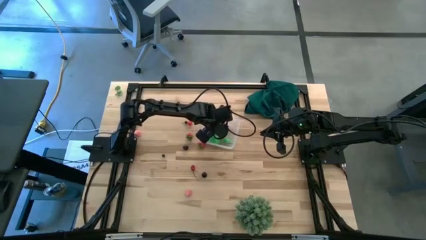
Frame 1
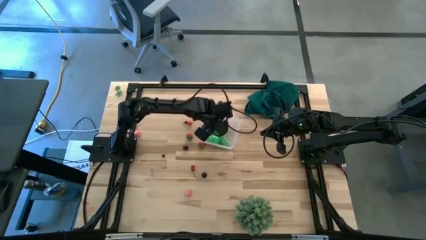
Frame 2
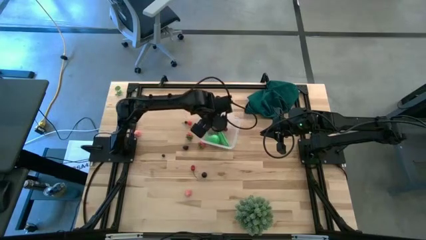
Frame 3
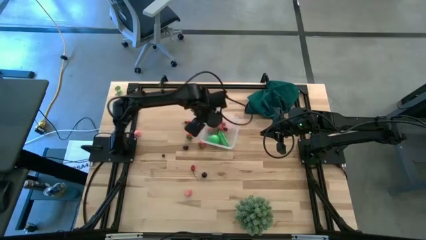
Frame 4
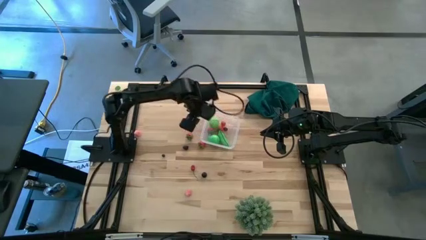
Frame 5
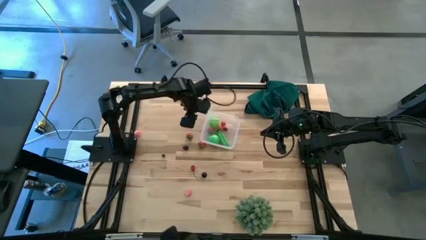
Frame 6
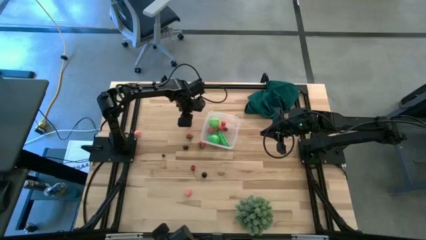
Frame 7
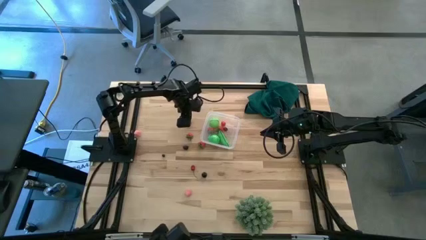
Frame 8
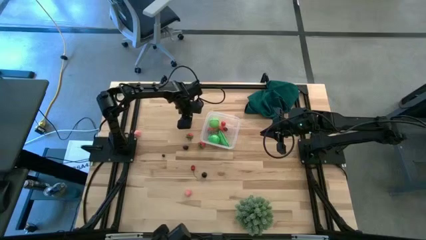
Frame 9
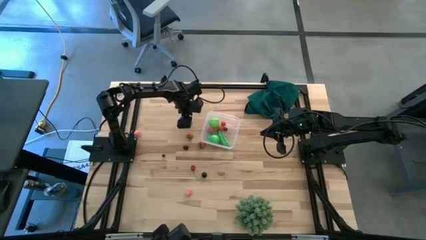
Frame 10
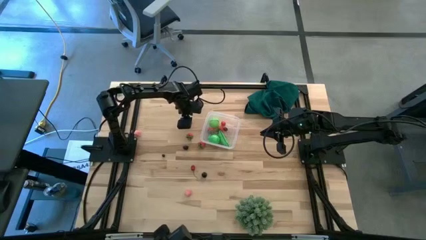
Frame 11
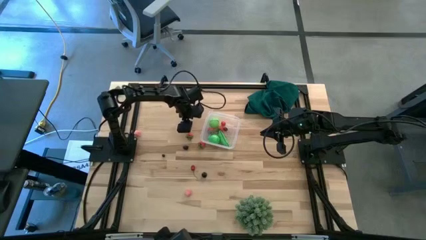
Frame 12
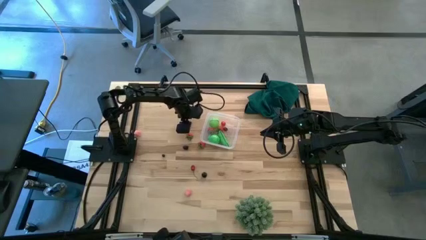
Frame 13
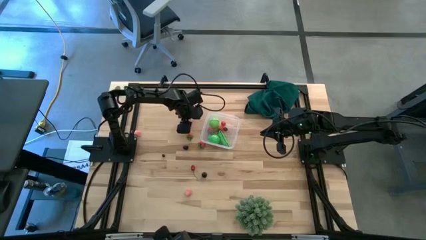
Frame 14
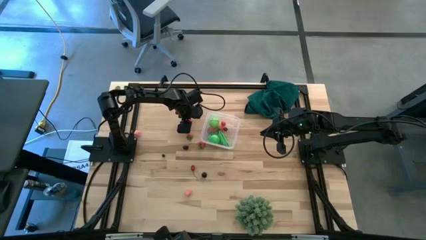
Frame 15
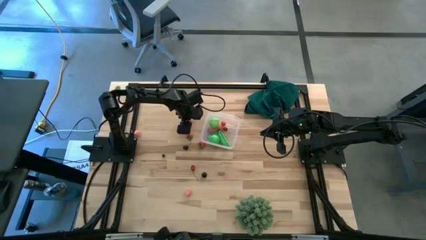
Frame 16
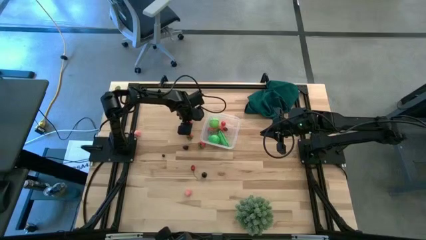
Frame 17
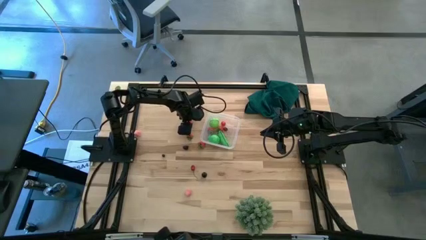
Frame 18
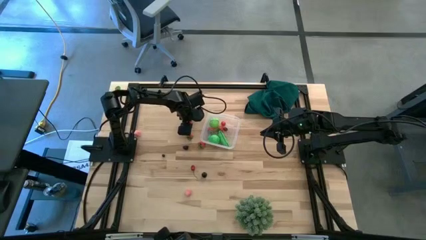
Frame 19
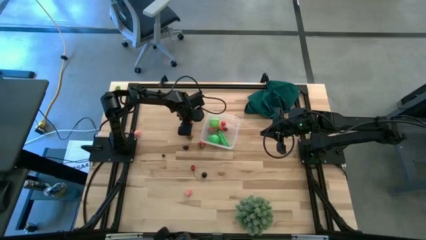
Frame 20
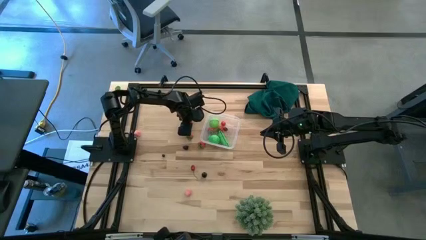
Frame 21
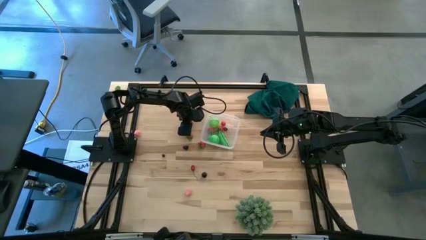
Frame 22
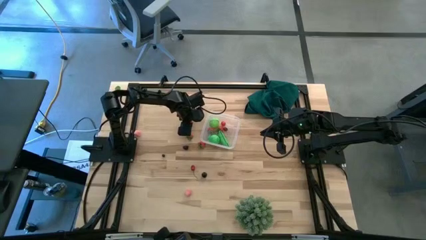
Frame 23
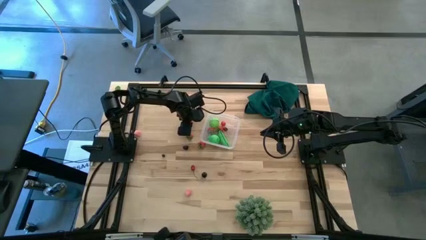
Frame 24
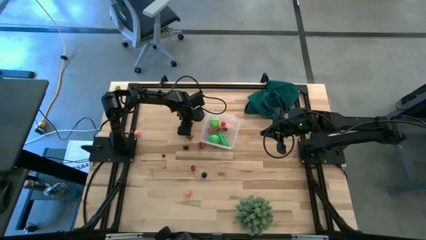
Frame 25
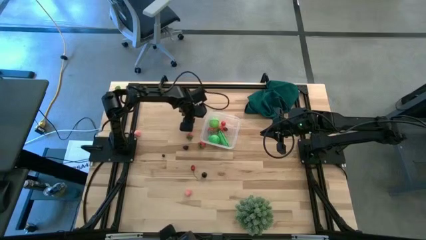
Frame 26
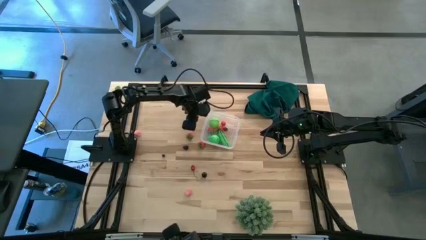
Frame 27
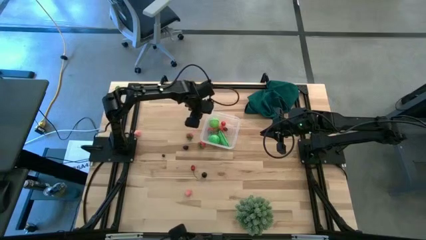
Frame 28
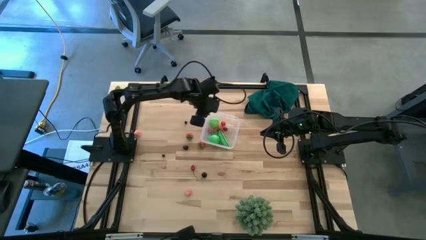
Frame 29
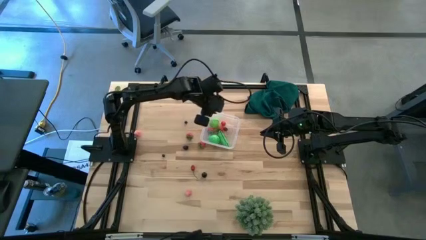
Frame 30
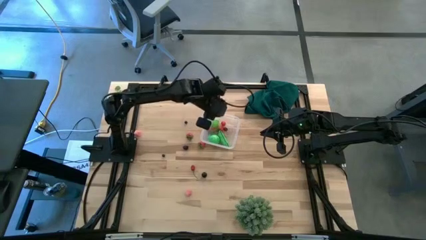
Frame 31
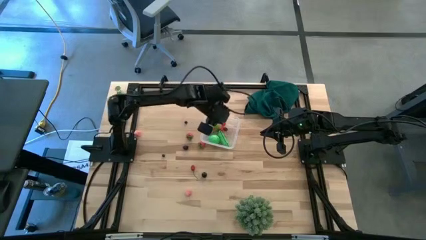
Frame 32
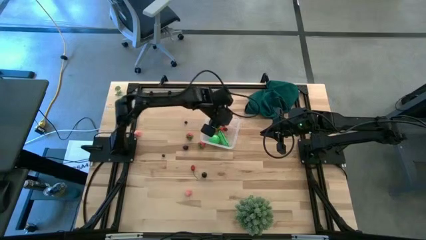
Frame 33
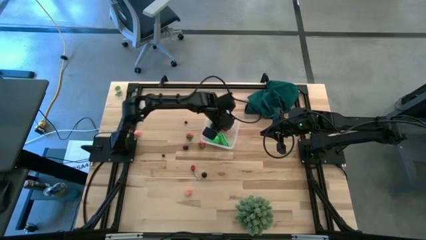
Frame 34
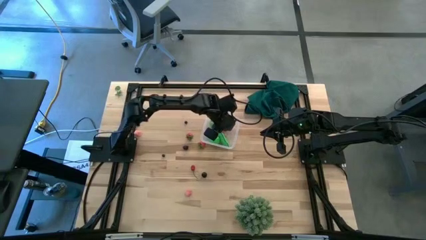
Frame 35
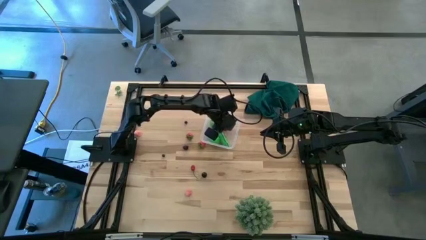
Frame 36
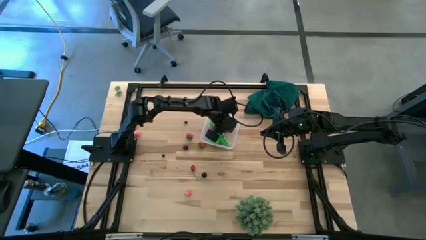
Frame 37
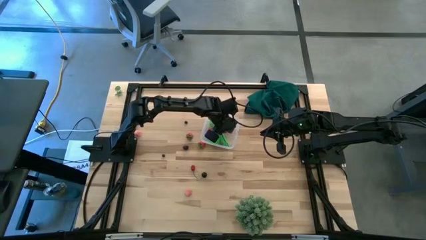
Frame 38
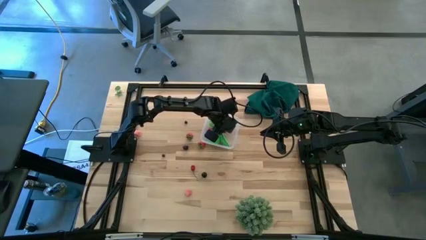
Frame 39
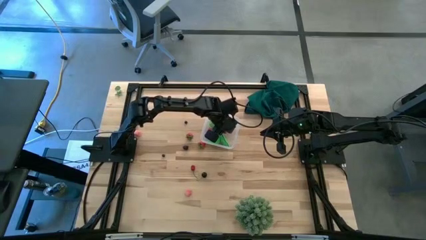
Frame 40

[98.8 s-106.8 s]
Task: Pick and placing Produce into tupperware
Put the red cherry into the transparent bin

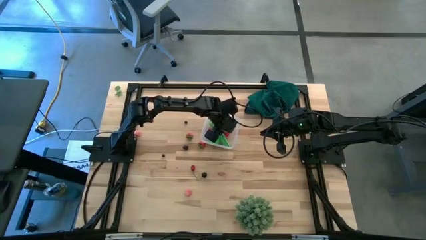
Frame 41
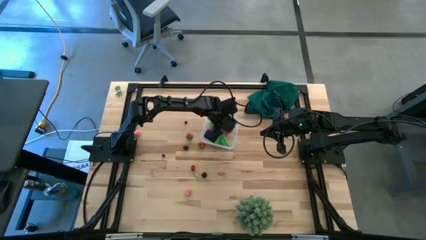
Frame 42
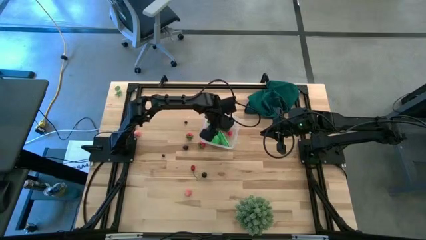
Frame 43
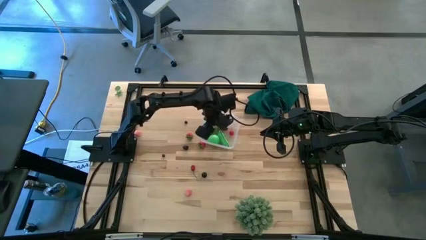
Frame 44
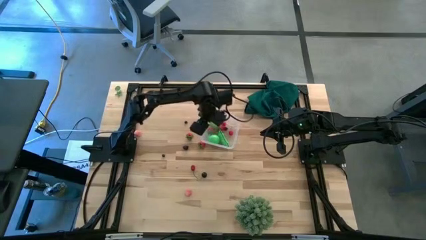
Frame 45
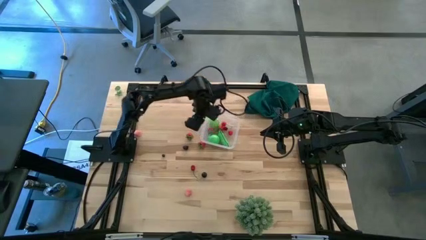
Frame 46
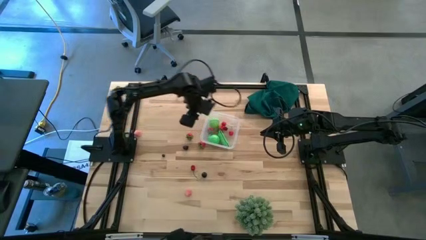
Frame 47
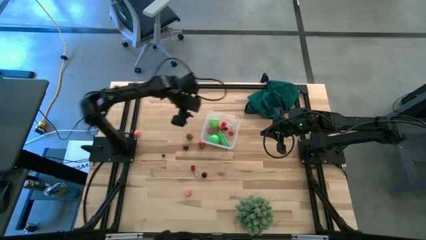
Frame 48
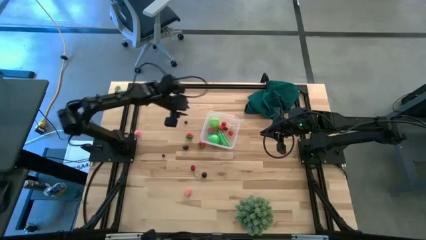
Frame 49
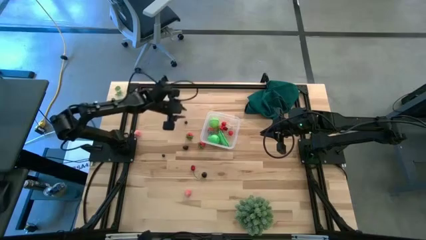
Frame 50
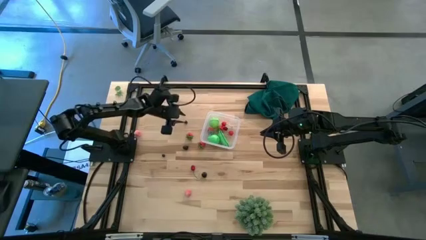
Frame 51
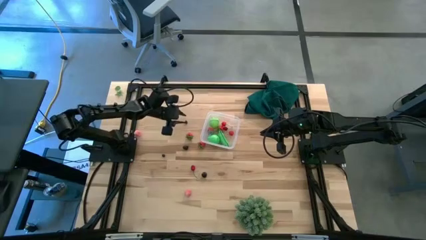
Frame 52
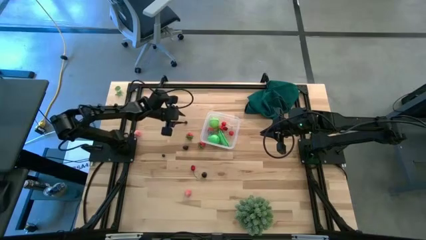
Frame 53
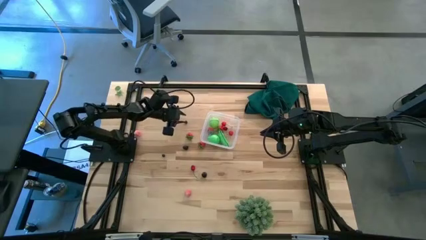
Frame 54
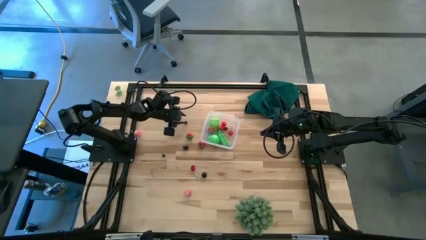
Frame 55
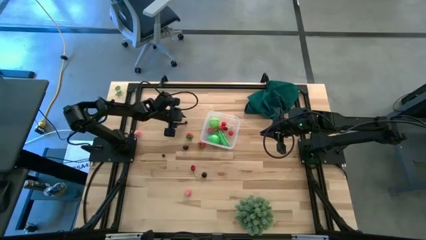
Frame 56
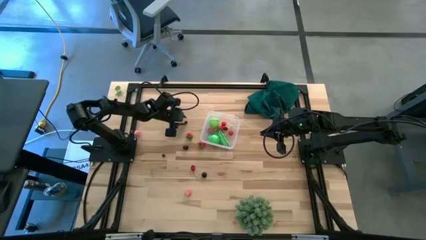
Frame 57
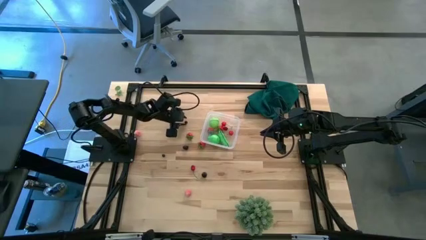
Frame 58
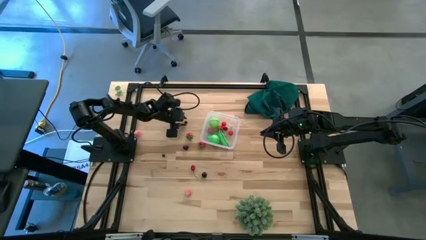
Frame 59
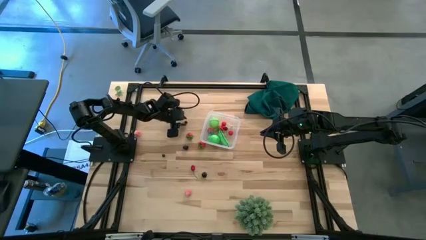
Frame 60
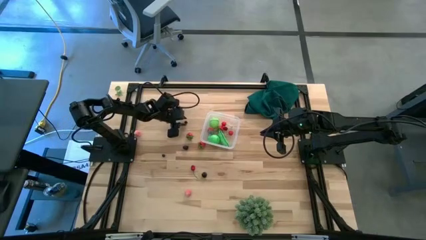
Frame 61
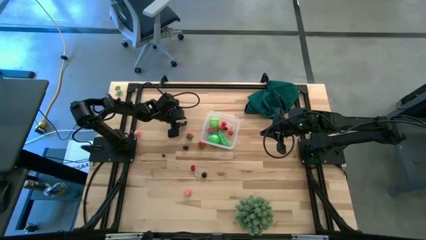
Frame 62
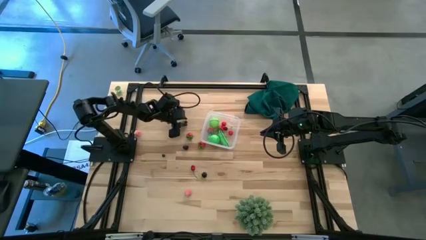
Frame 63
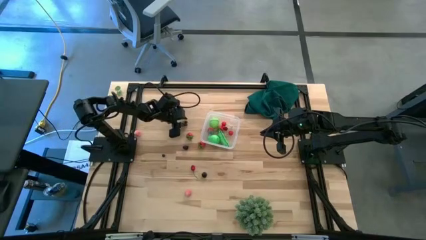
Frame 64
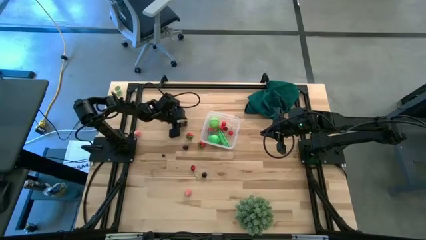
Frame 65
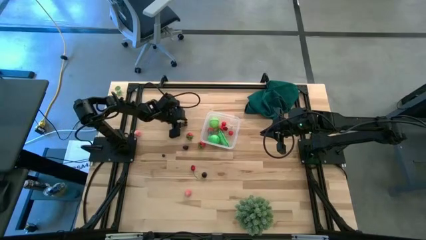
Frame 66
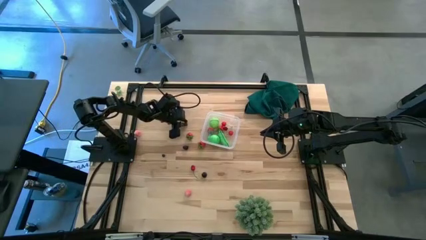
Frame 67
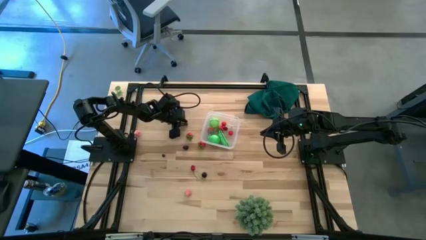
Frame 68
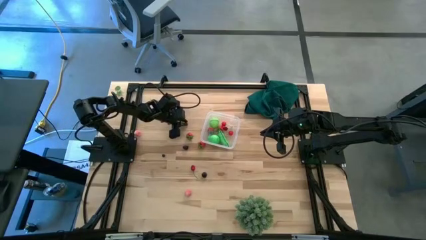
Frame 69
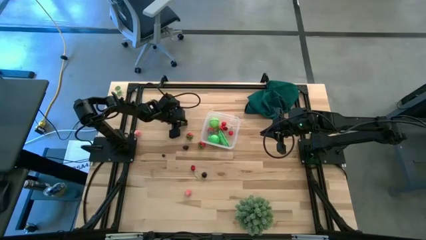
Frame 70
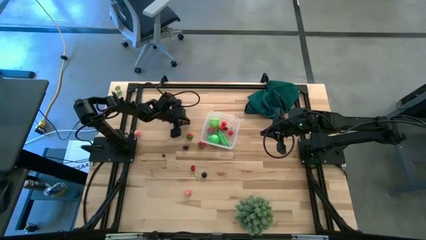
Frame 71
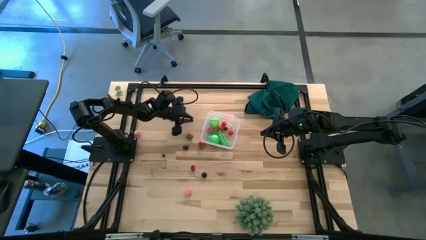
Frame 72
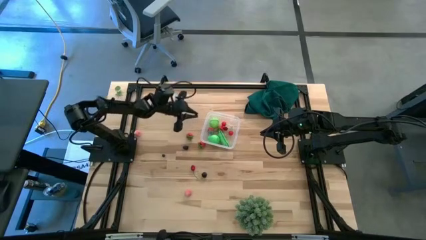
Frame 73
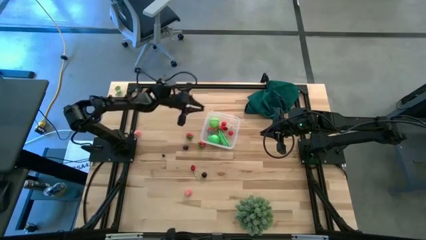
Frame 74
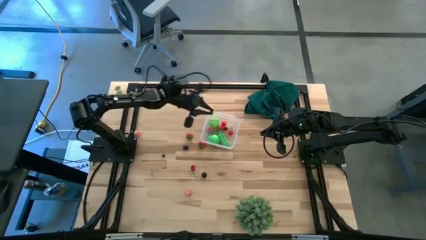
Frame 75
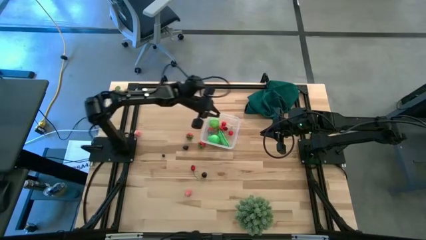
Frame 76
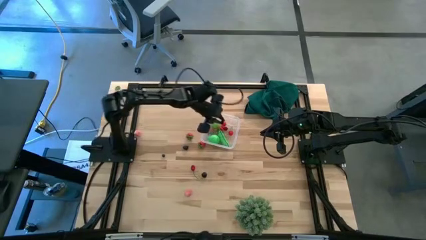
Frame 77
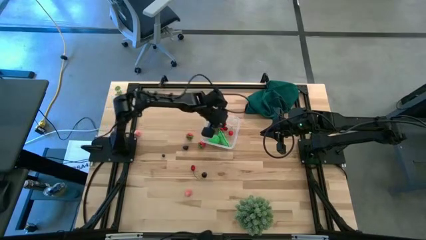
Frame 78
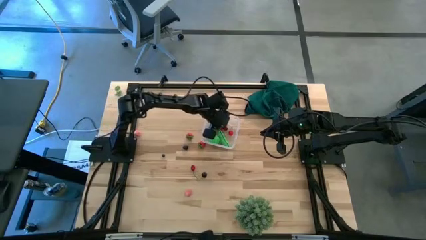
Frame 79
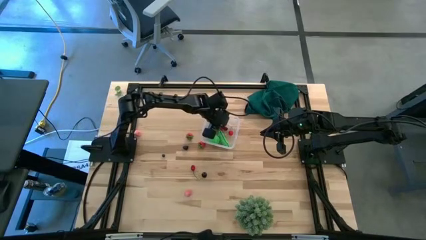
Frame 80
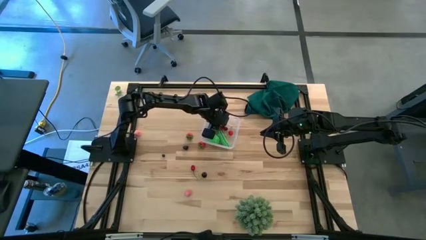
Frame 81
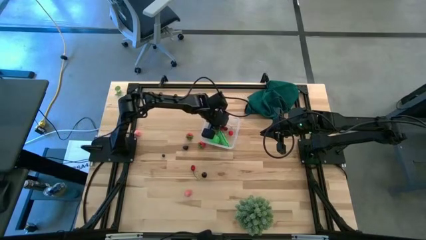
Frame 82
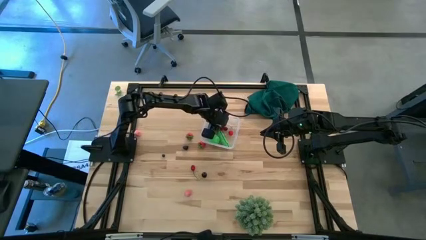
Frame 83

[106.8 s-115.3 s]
Put the blueberry into the transparent bin

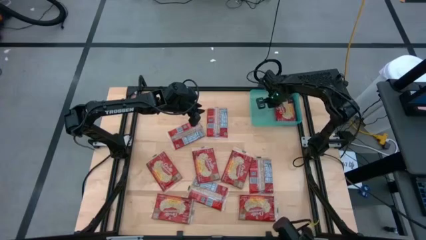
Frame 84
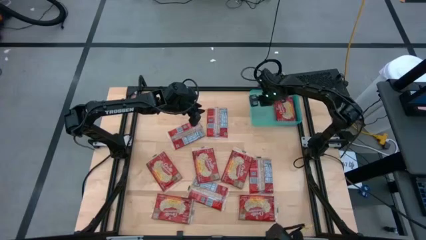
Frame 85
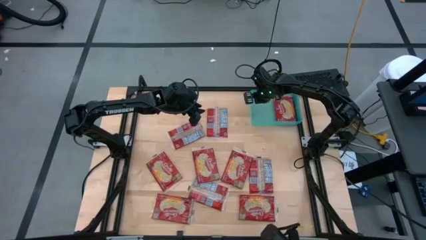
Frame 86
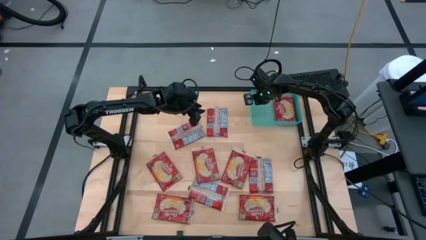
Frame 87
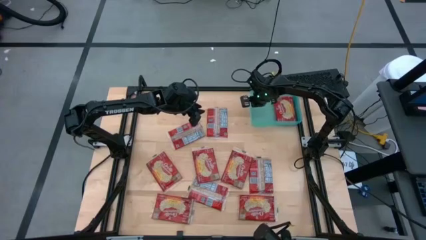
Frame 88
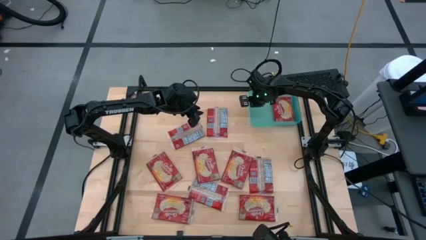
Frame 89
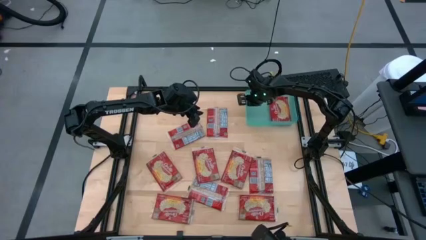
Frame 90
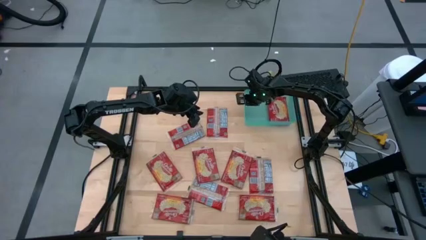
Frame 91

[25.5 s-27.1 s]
Task: Sort popcorn bags into baskets
Adjust the light blue bin
